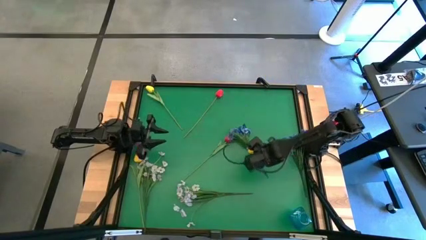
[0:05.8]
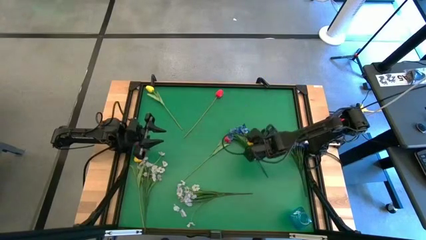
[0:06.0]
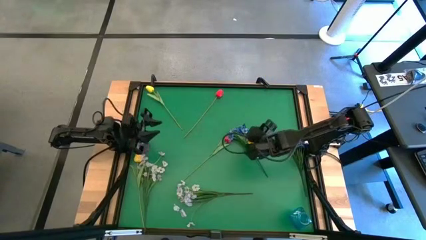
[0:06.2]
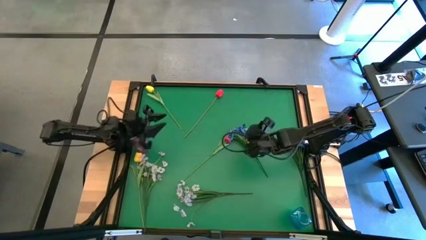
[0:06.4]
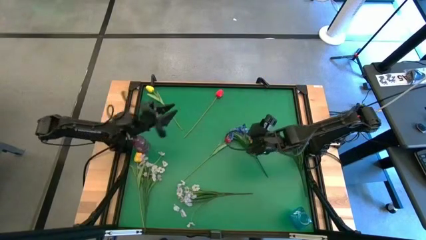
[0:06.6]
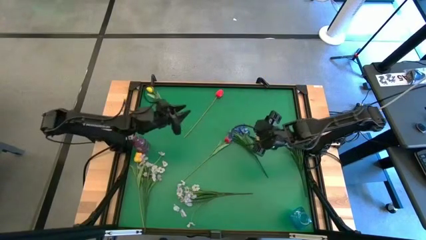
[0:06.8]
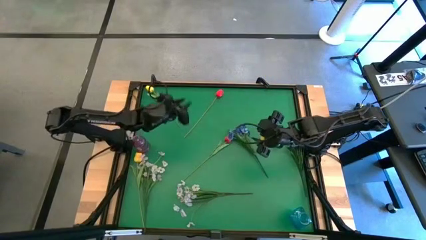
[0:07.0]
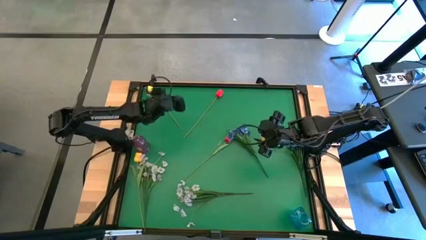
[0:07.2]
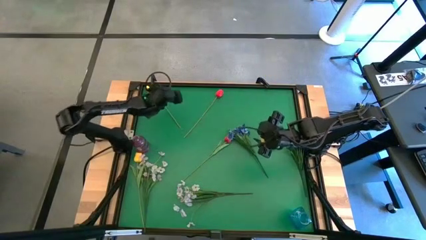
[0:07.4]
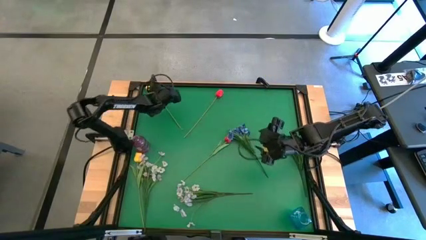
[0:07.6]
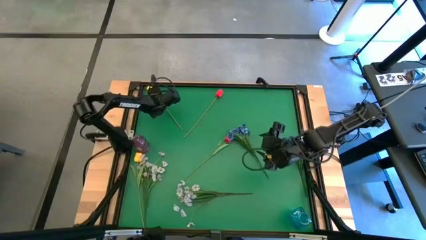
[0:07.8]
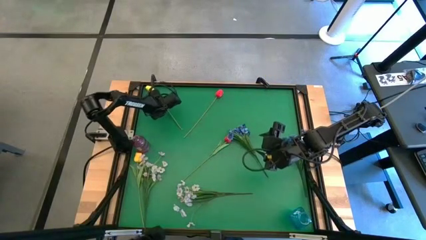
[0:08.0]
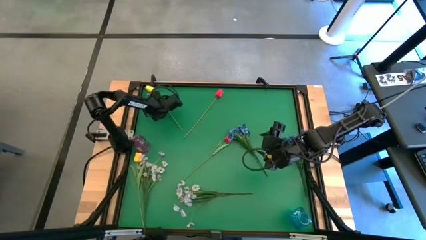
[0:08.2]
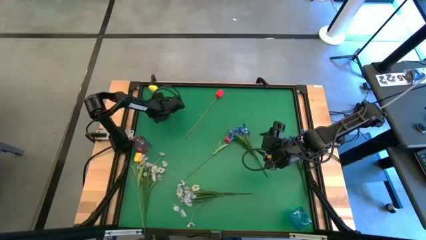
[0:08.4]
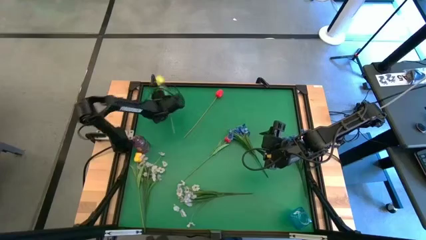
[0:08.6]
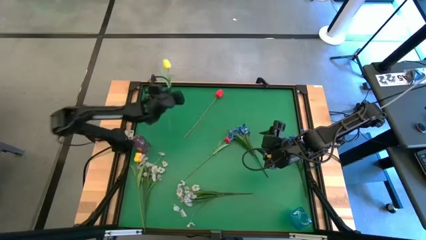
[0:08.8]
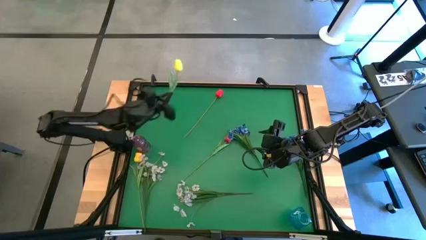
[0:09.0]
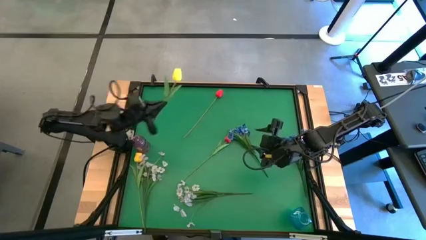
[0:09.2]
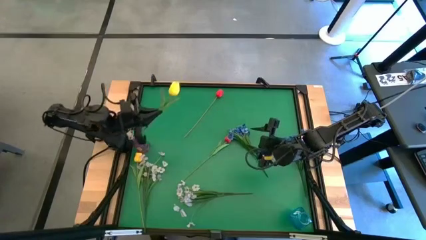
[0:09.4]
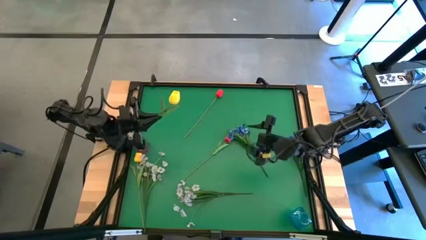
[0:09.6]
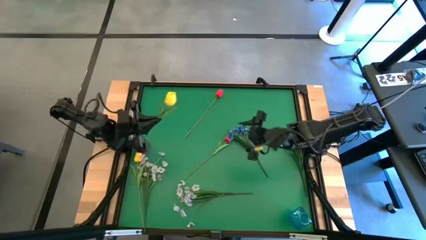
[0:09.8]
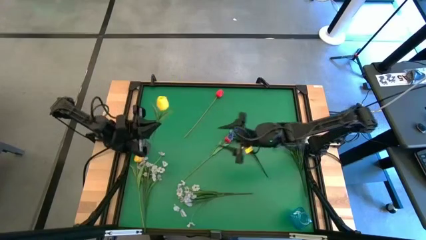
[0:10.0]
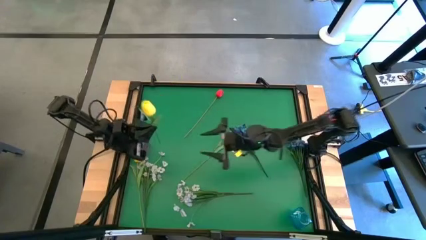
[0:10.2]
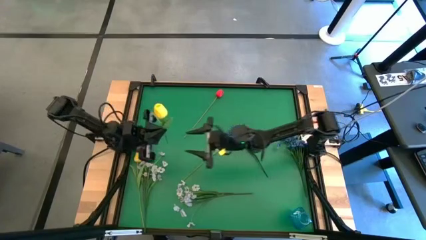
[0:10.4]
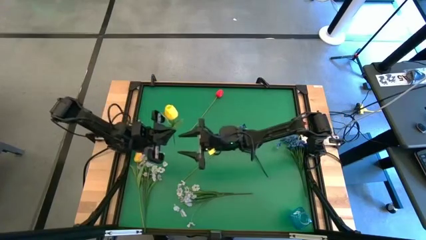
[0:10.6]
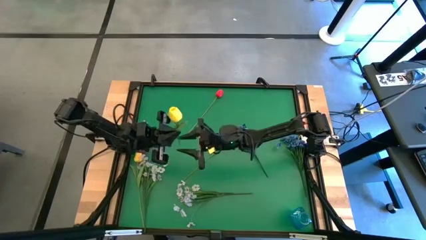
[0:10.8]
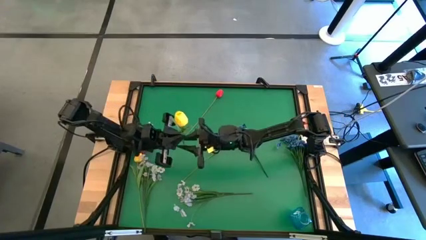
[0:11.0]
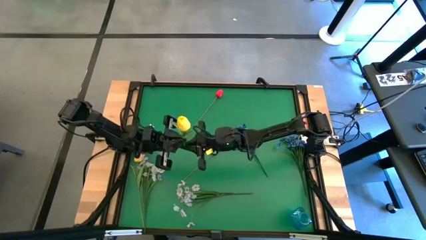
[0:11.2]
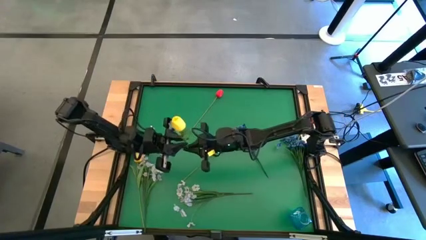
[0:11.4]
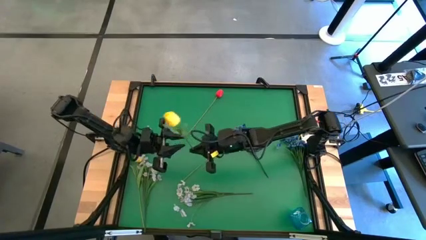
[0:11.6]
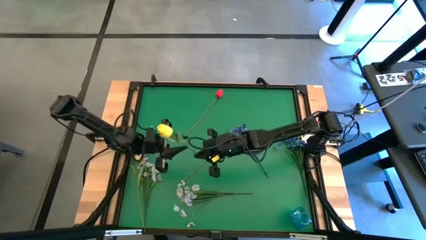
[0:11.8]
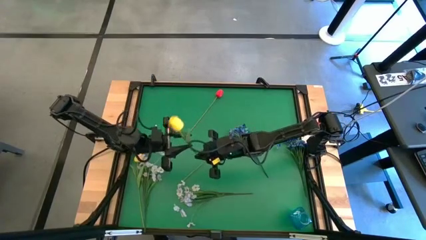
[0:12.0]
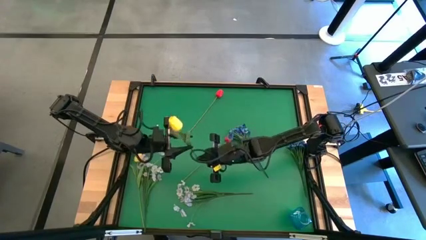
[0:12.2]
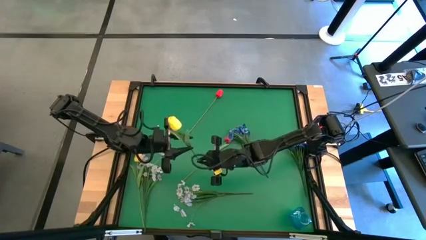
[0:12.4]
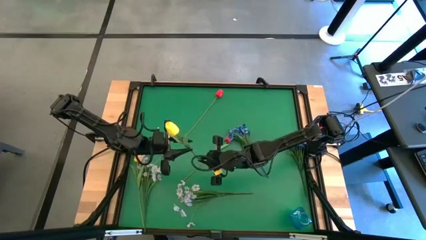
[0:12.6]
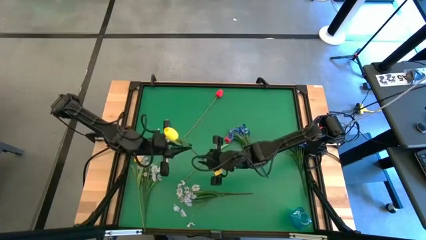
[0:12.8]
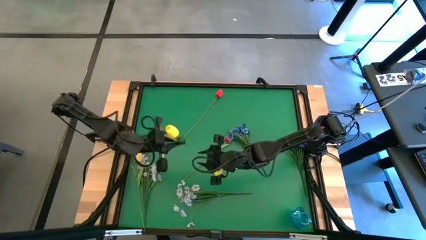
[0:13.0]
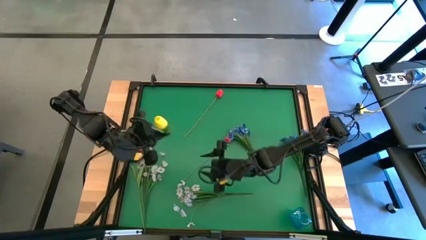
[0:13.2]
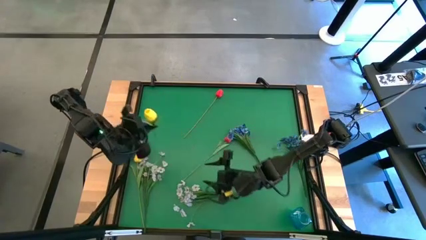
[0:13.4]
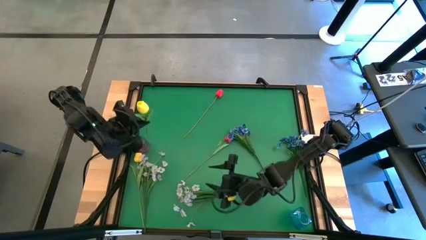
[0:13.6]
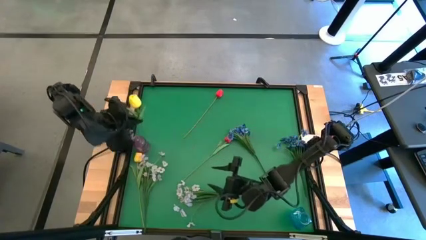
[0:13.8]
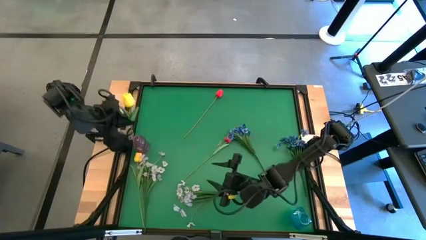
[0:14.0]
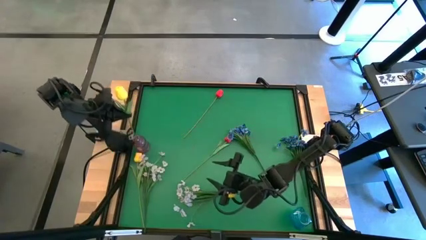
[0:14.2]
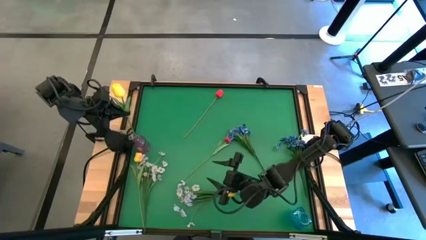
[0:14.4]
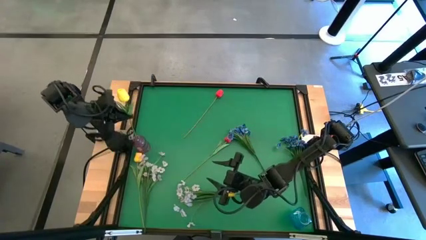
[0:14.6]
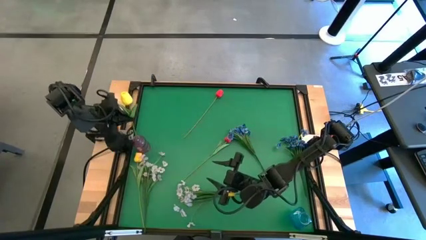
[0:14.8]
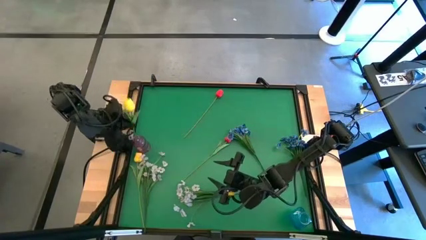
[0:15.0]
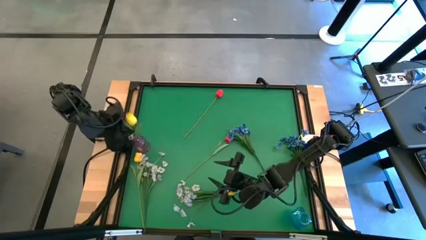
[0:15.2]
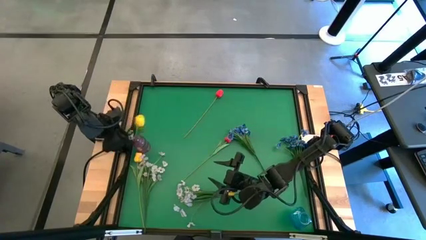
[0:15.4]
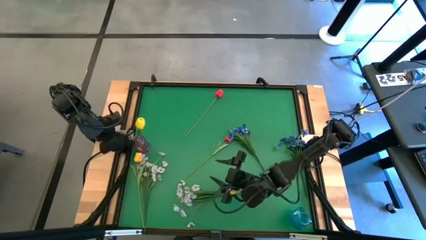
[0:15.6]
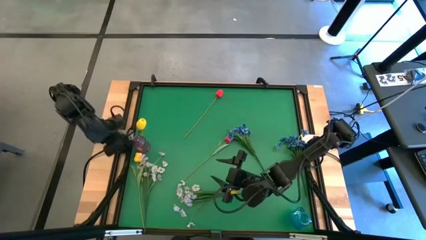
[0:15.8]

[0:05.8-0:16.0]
Task: Sort flowers into vase by color
Put the top left yellow flower into the purple vase

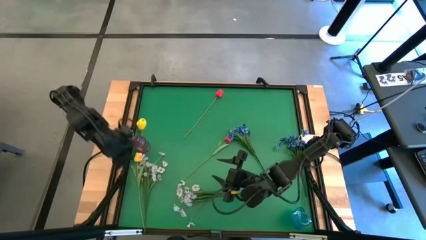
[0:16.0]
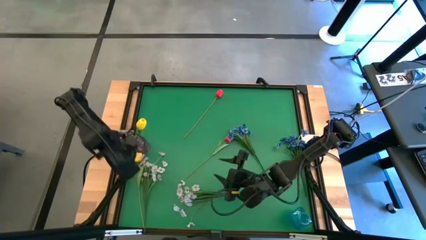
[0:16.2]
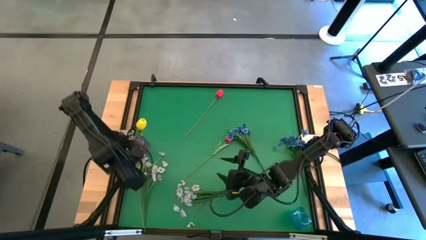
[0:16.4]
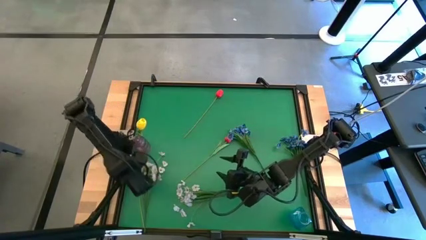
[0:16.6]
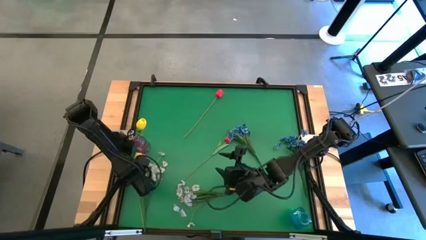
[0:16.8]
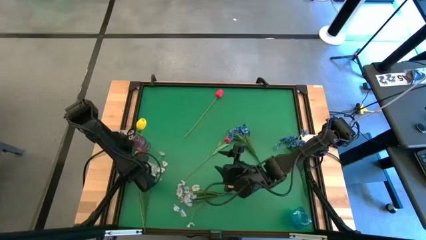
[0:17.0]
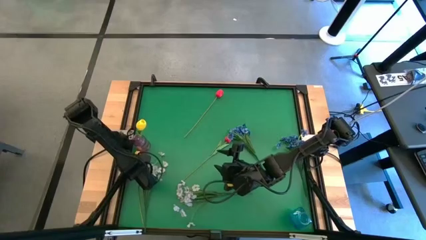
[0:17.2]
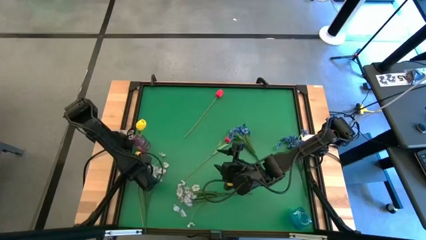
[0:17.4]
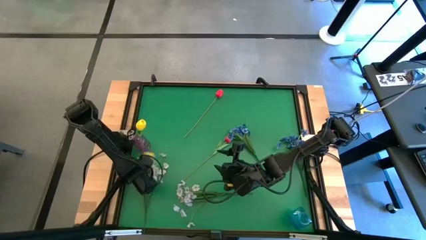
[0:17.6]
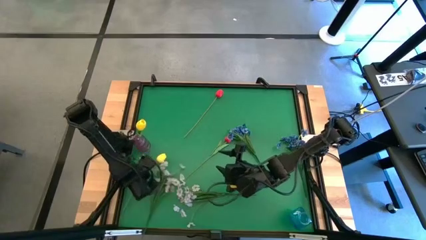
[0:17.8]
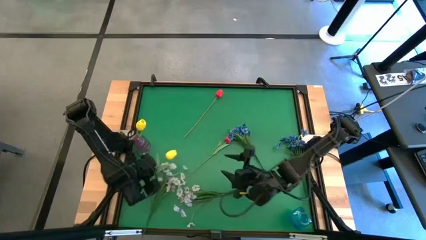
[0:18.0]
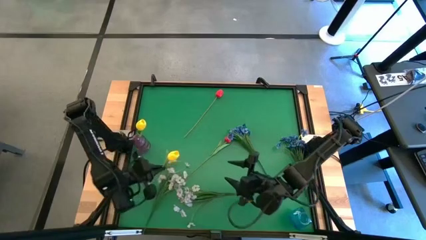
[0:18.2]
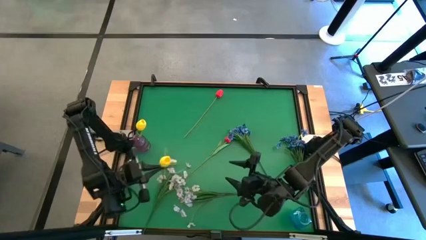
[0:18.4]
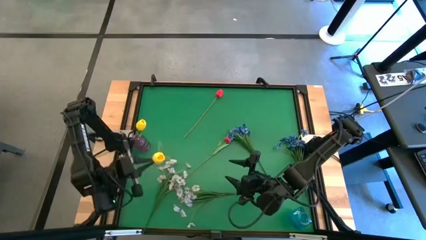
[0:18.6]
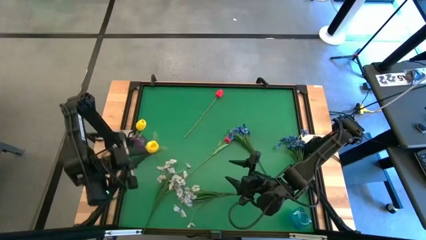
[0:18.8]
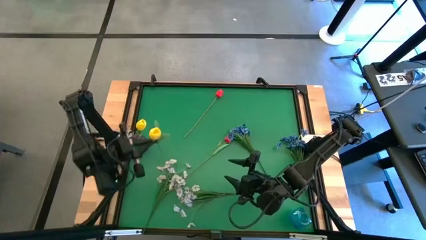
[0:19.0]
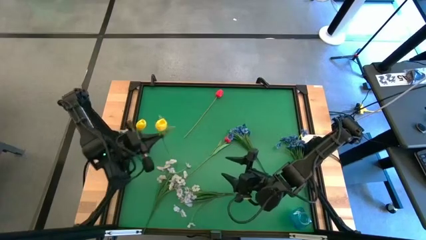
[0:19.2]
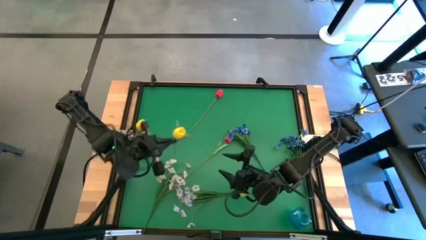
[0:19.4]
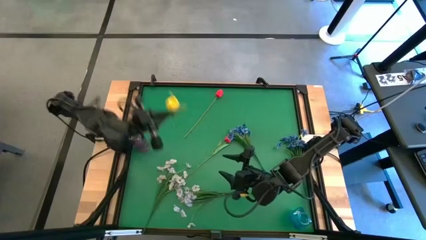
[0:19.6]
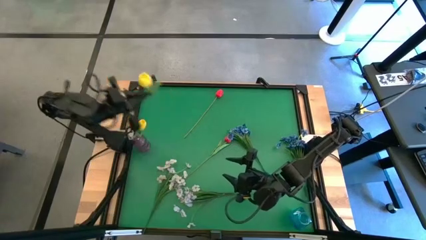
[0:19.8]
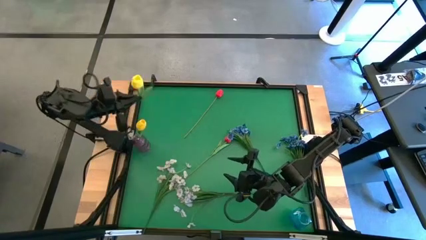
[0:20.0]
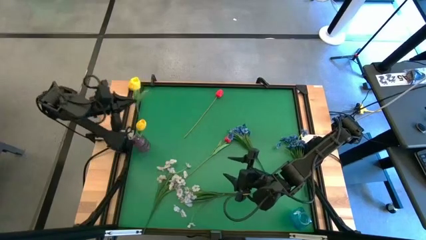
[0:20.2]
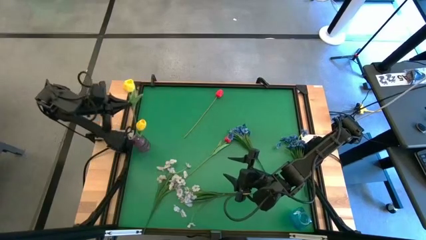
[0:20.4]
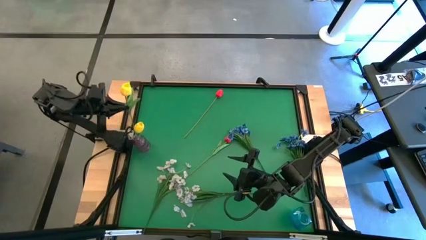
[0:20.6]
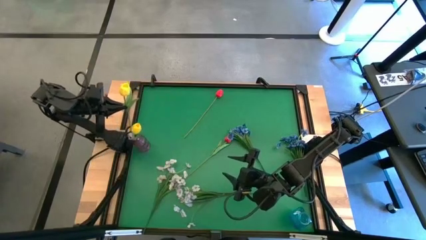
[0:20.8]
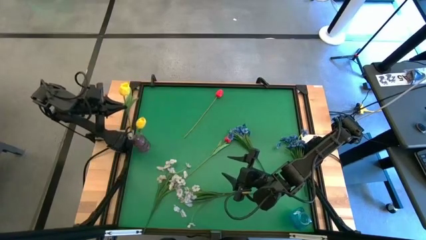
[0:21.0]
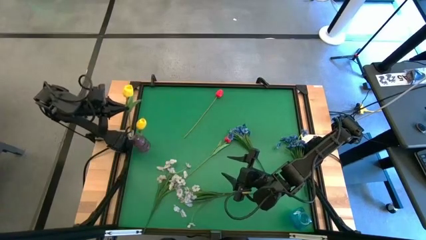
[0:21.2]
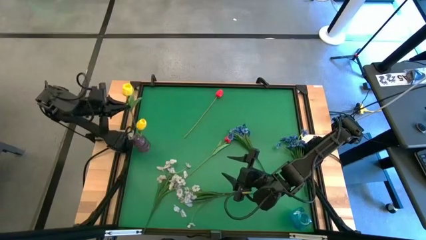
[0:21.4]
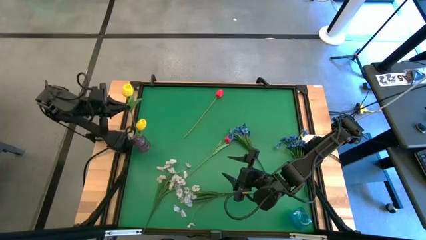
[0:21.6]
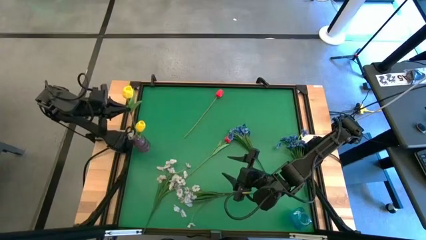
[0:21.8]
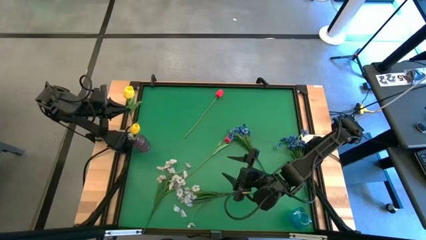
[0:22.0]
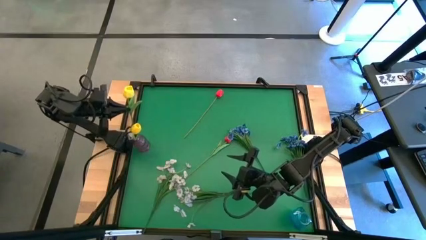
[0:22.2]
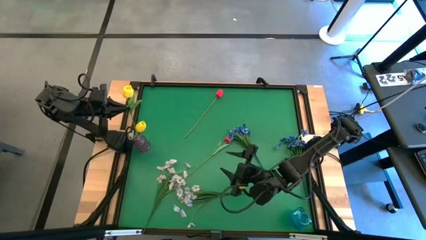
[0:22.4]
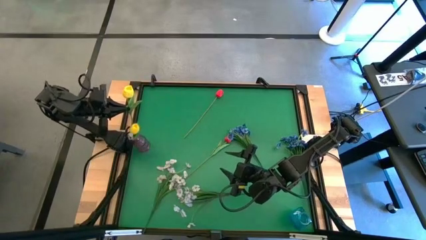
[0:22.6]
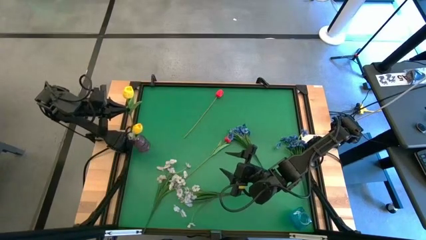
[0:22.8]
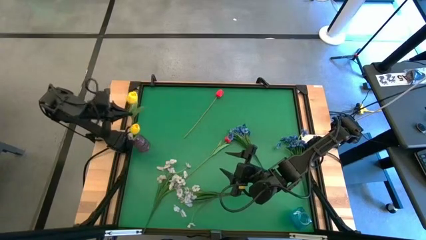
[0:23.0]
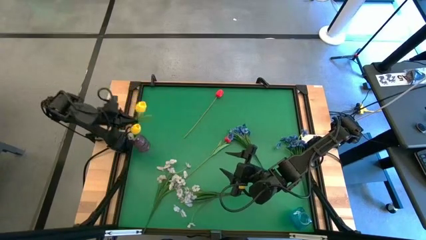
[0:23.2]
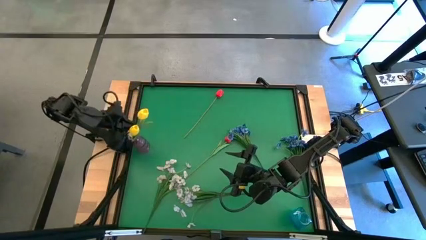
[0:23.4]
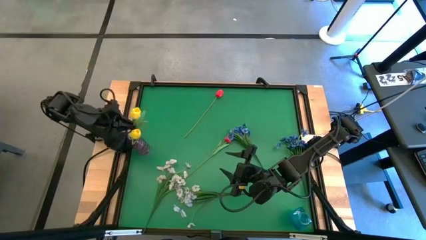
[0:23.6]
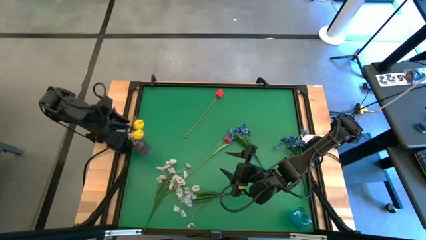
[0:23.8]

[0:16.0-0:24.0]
Put the yellow flower into the purple vase
